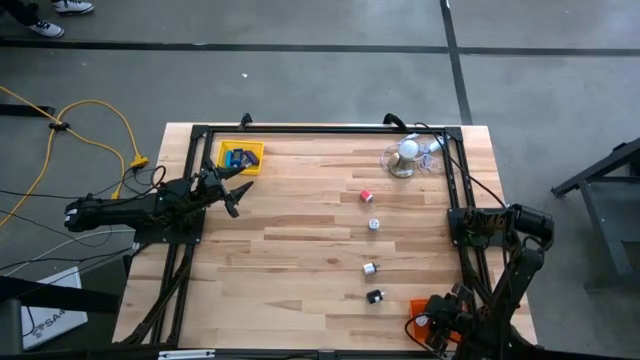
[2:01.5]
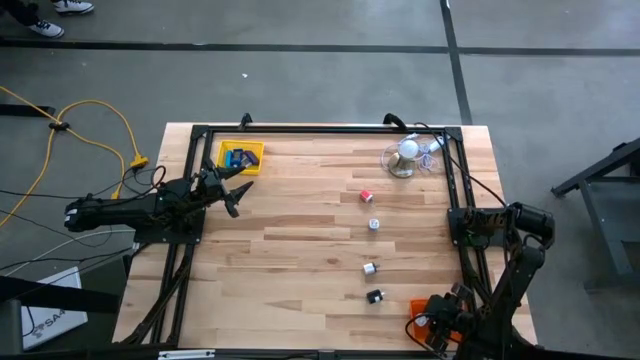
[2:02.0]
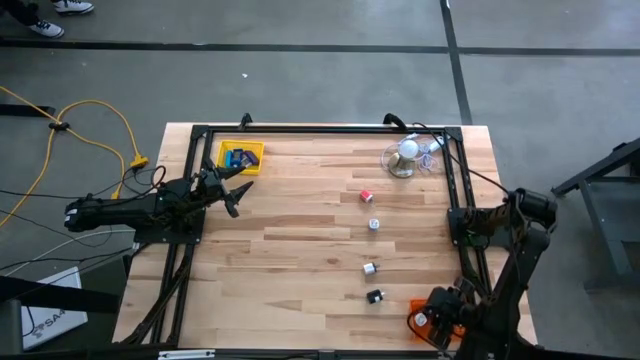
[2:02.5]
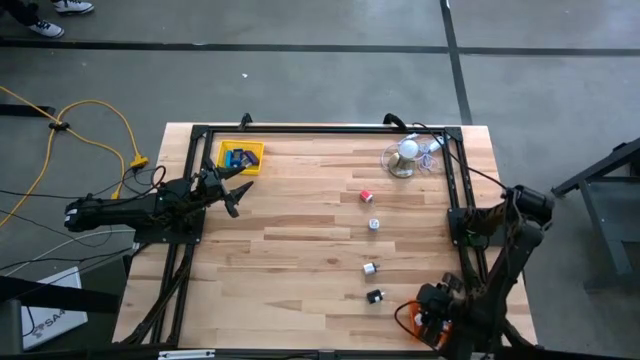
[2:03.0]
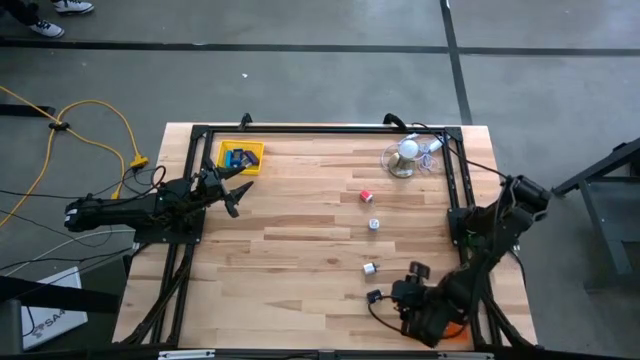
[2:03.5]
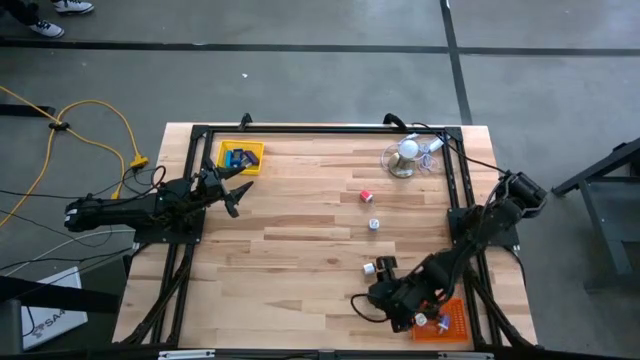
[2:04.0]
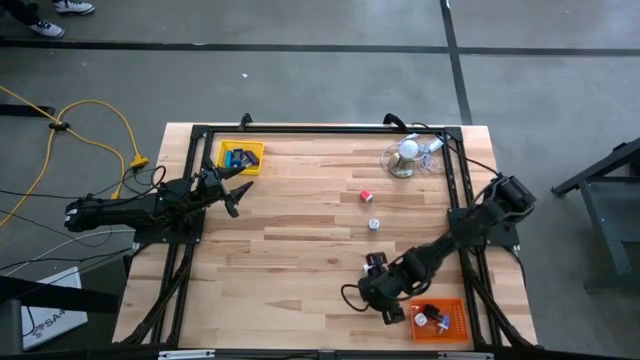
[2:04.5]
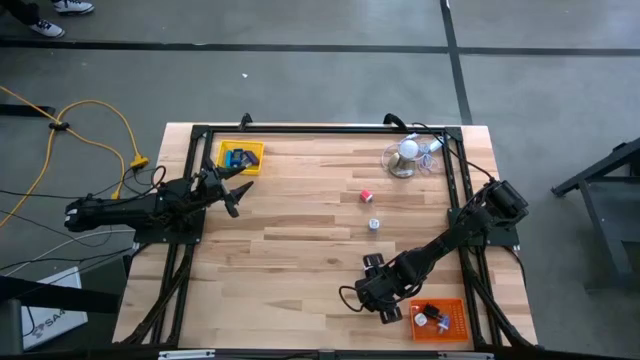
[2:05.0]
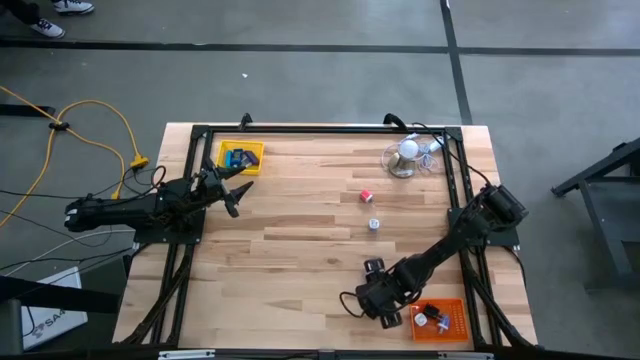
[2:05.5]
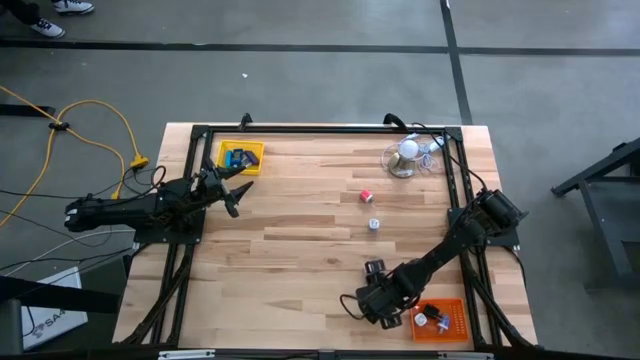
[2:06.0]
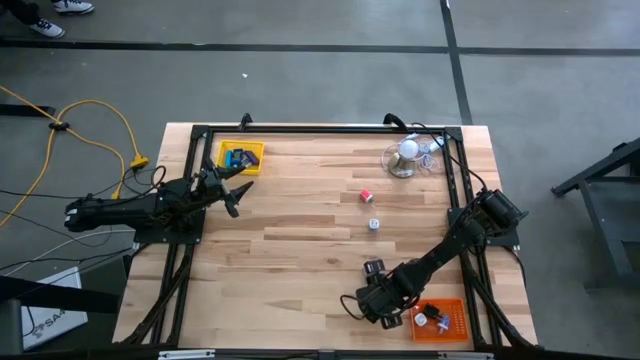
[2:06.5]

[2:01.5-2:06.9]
Task: Pick & Place Office items
Put the black charger adapter into the orange bin

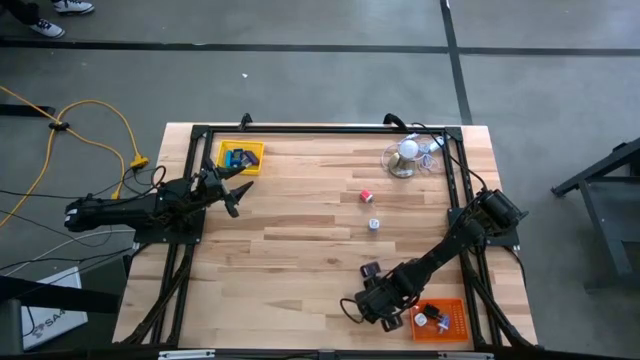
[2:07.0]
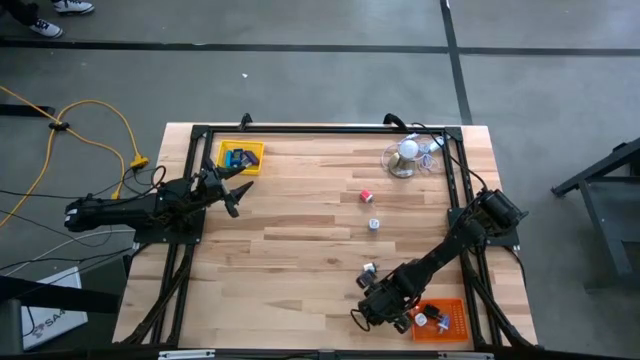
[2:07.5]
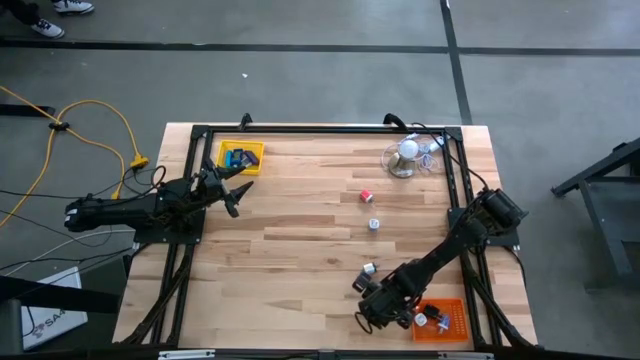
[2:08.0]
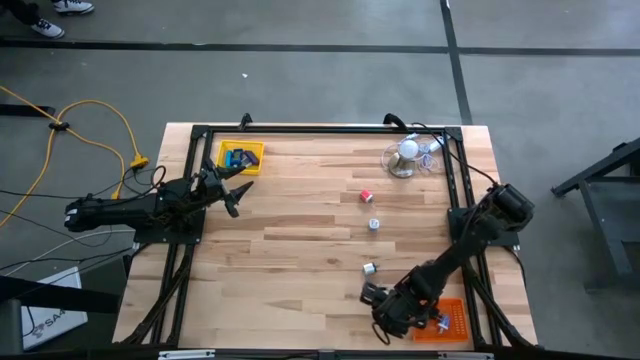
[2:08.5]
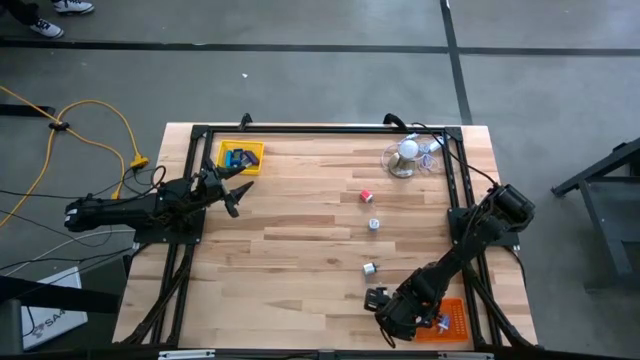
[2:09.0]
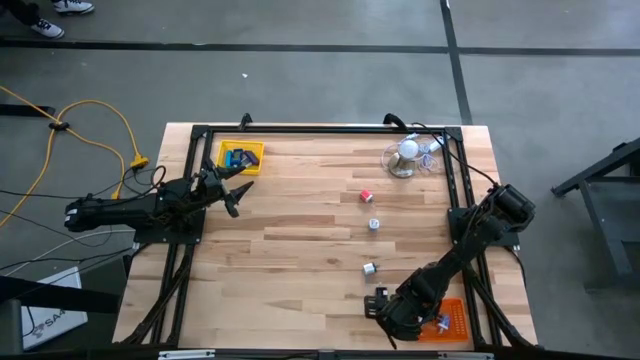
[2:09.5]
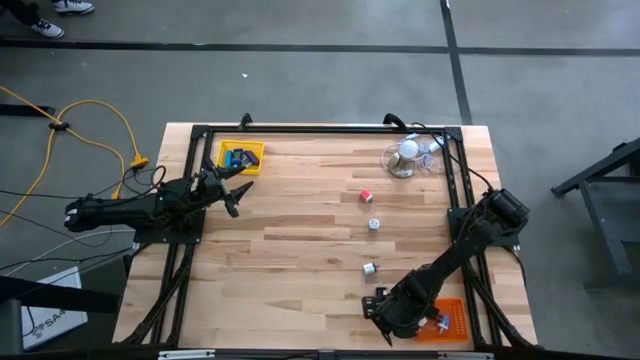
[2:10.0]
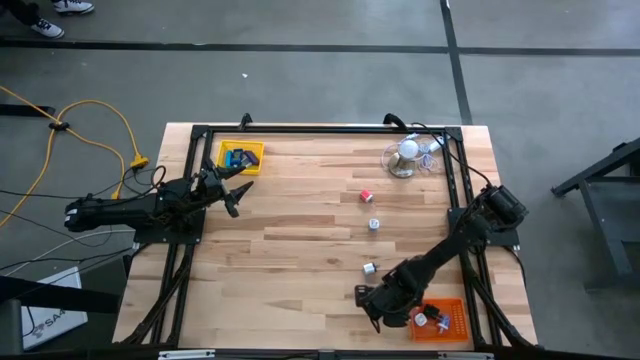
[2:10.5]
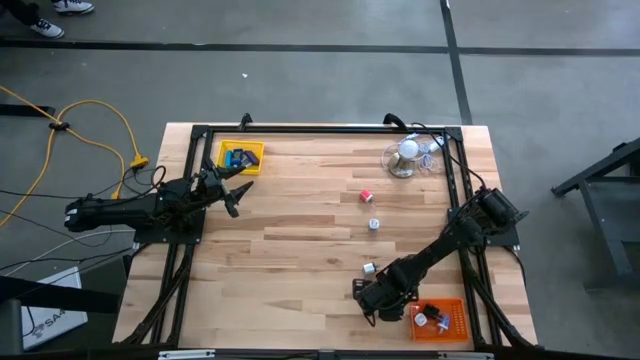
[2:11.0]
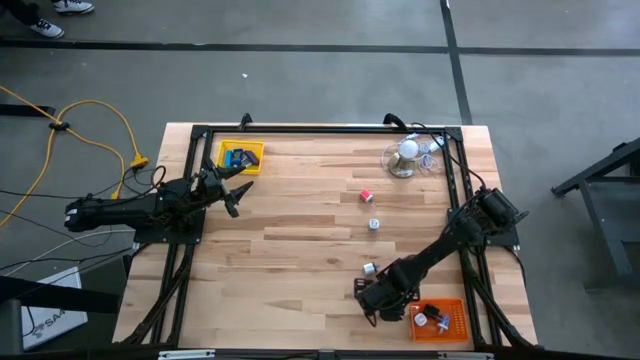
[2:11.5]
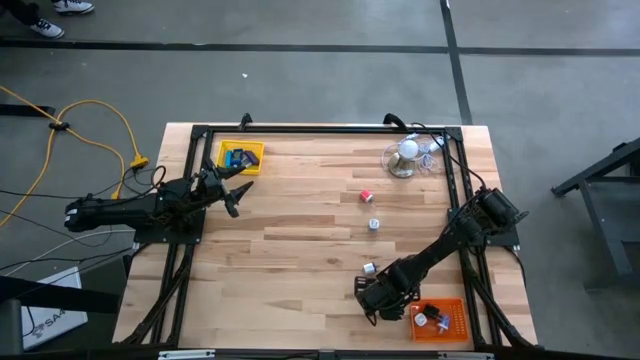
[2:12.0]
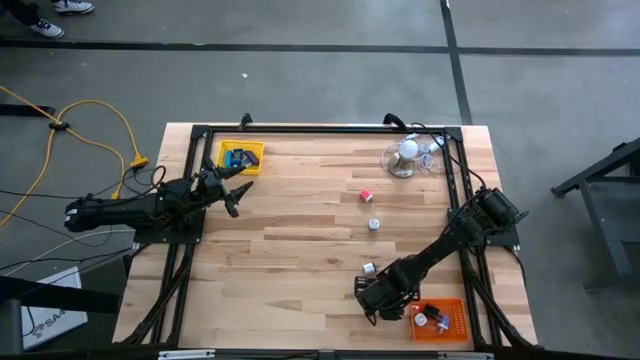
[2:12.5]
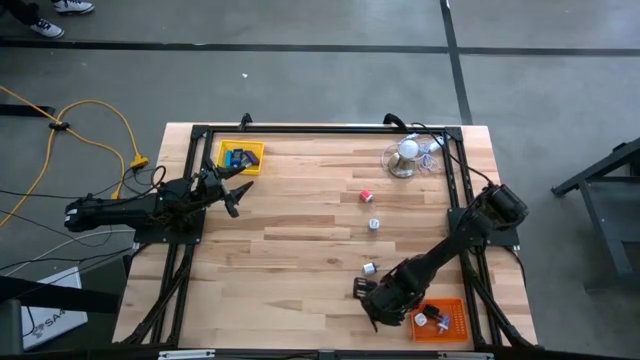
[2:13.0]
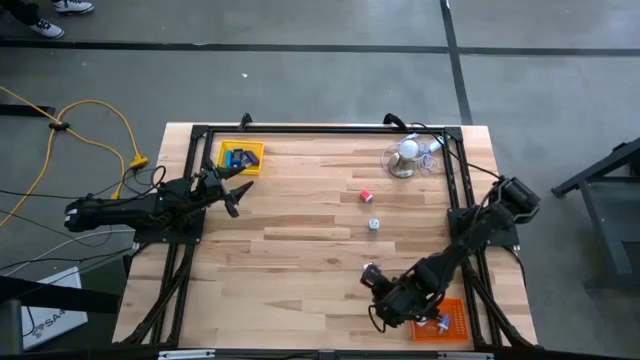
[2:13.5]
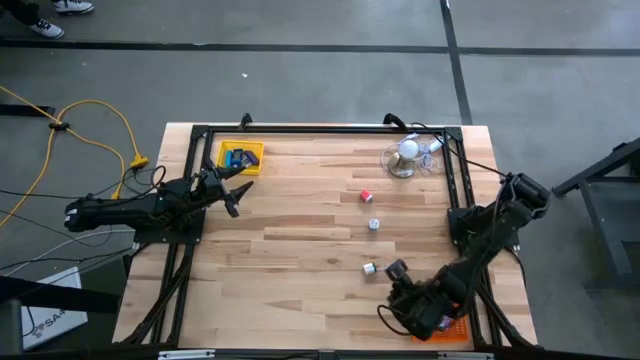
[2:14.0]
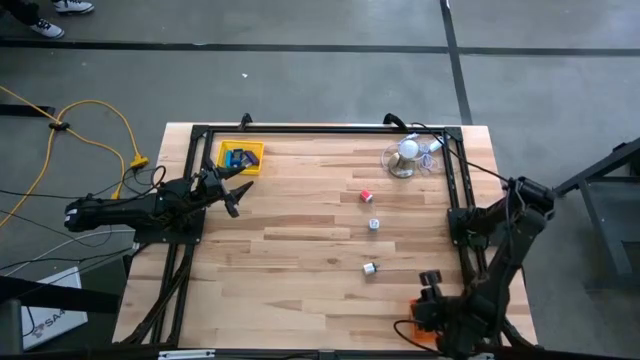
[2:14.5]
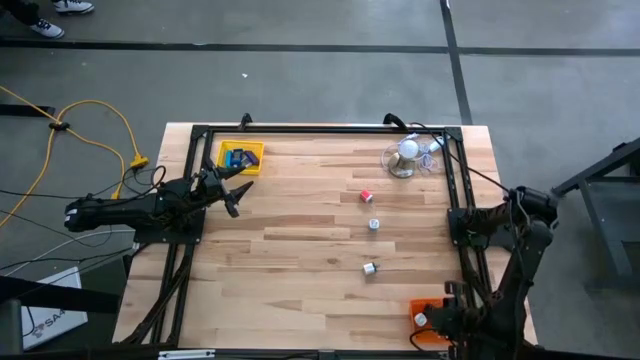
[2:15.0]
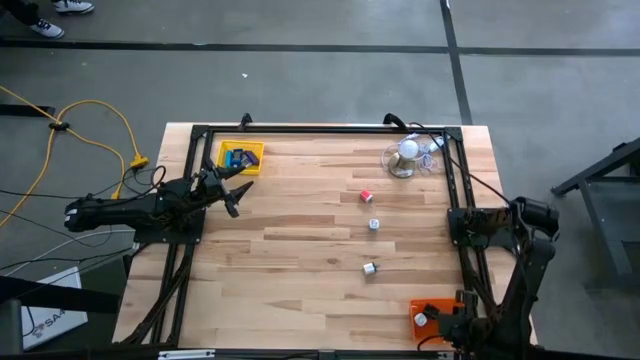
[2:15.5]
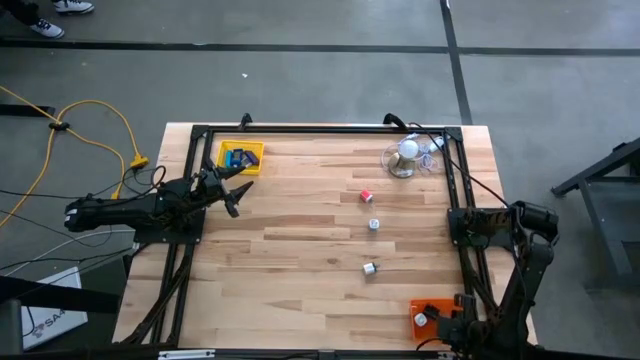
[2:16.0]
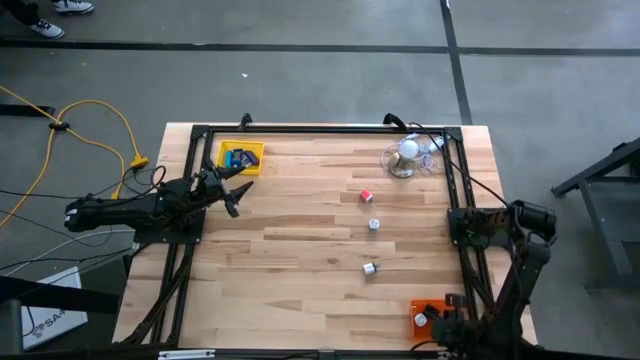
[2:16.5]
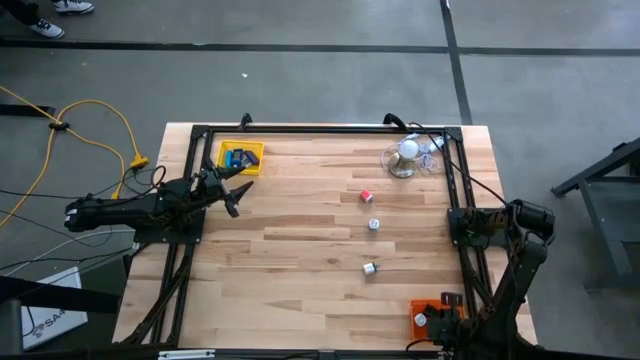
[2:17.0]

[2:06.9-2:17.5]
Put the black charger adapter into the orange bin
